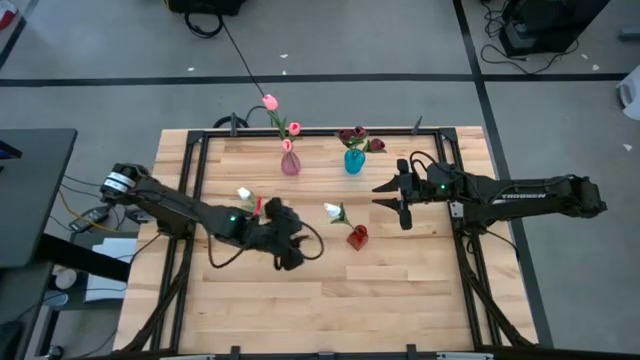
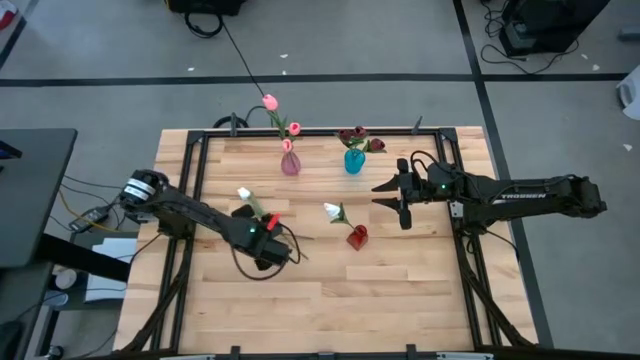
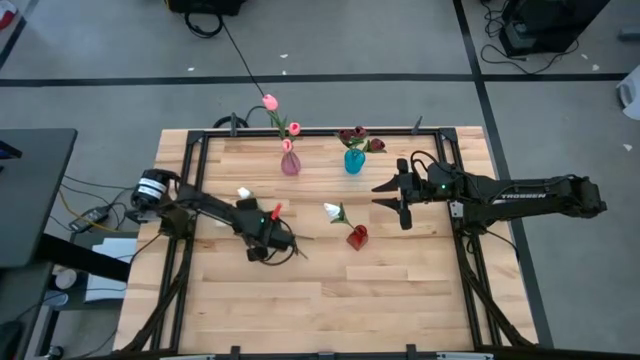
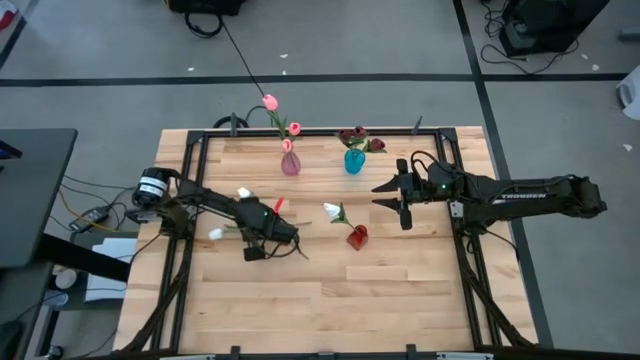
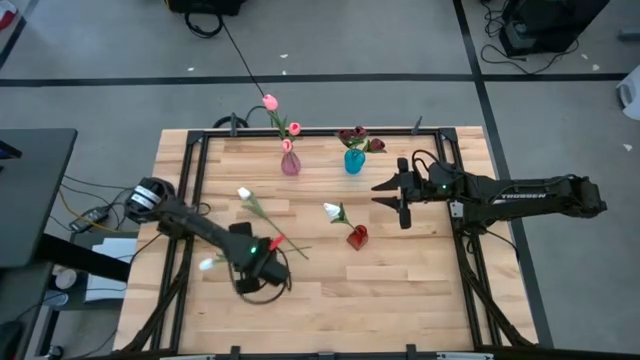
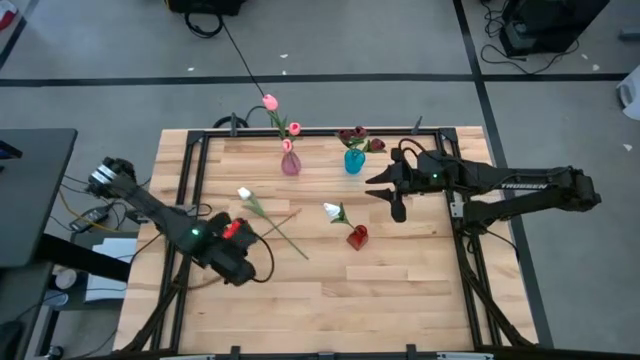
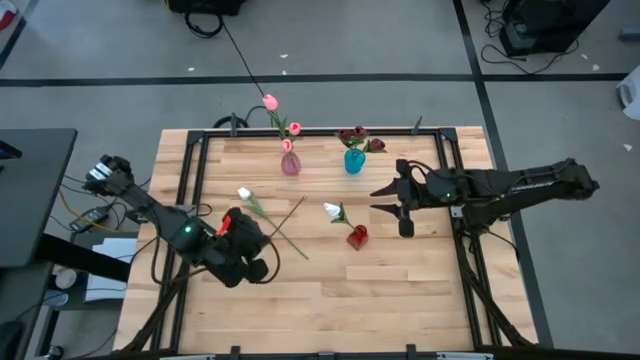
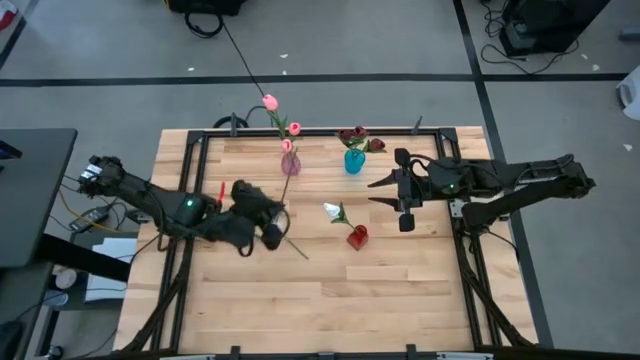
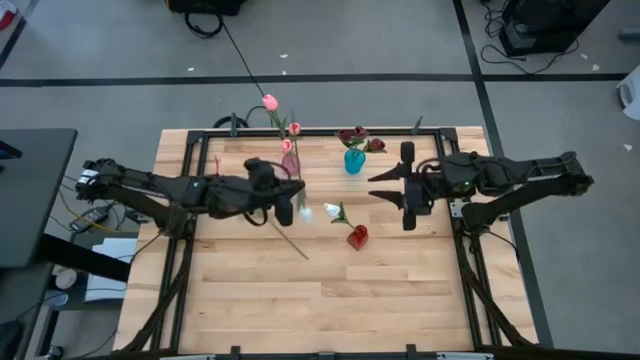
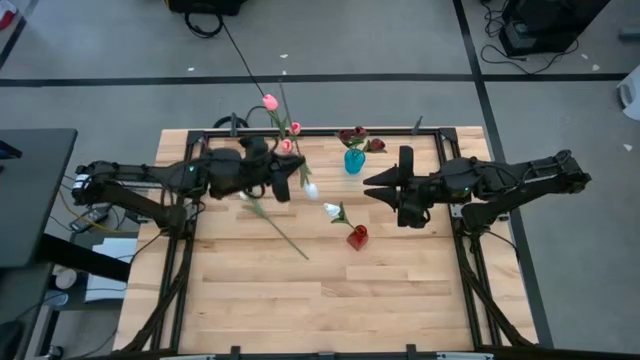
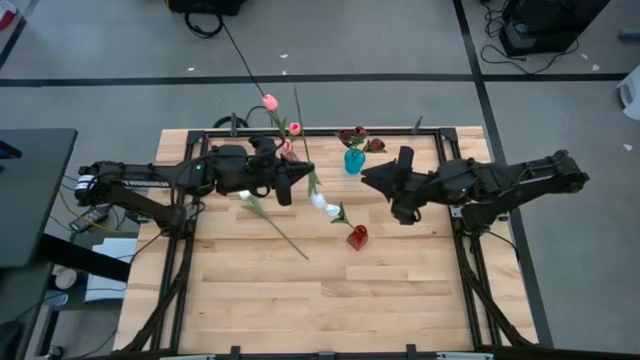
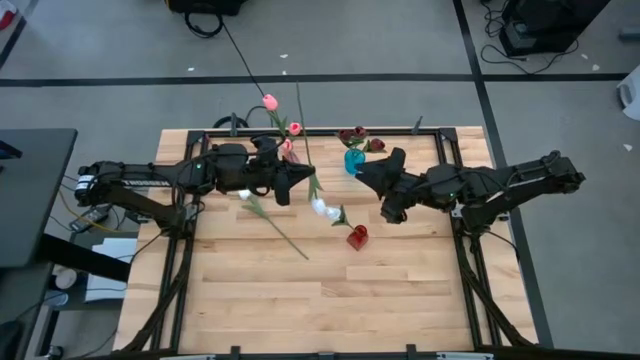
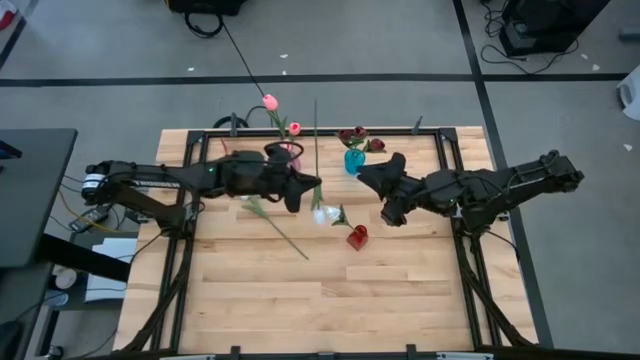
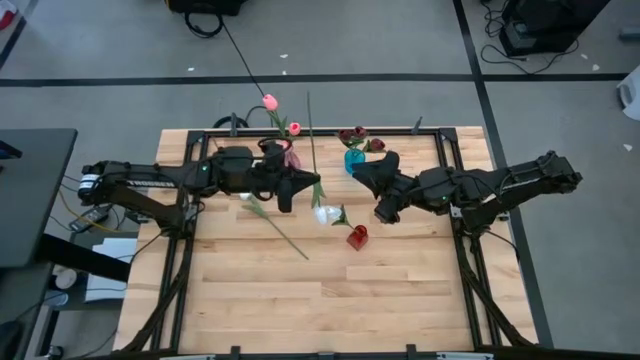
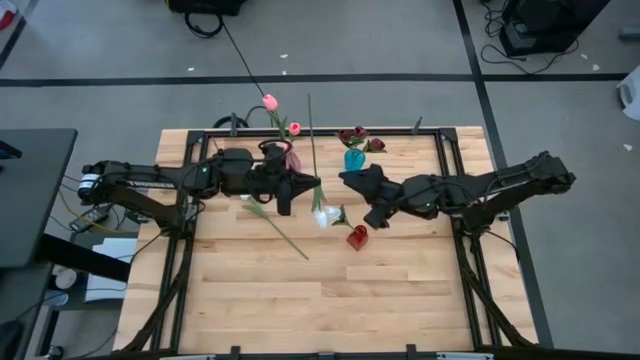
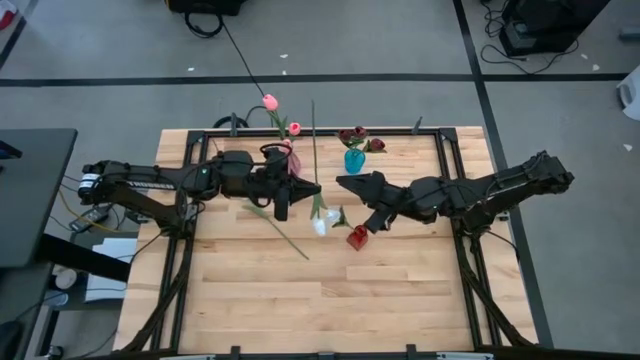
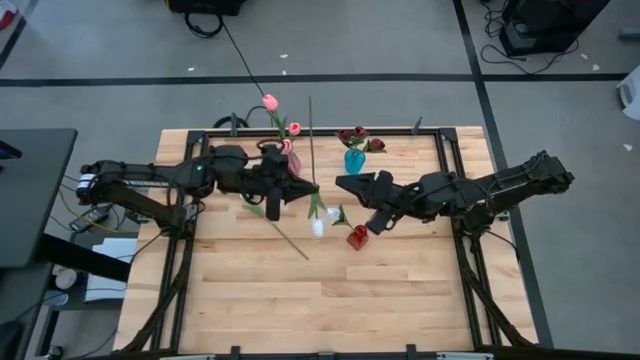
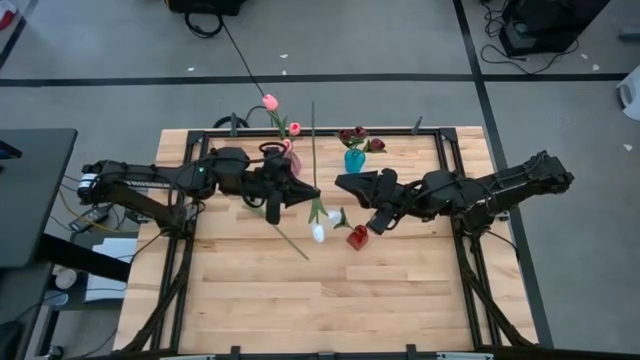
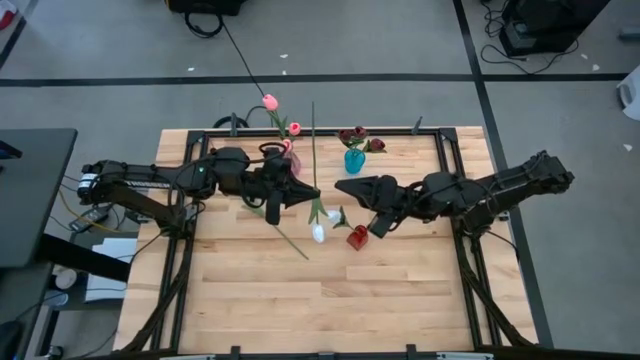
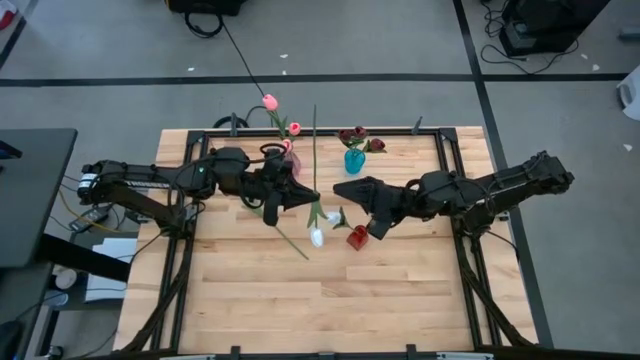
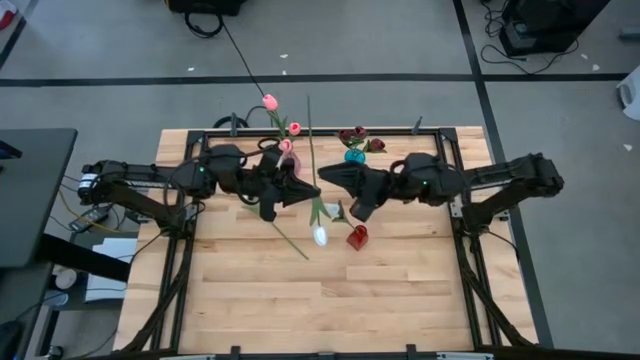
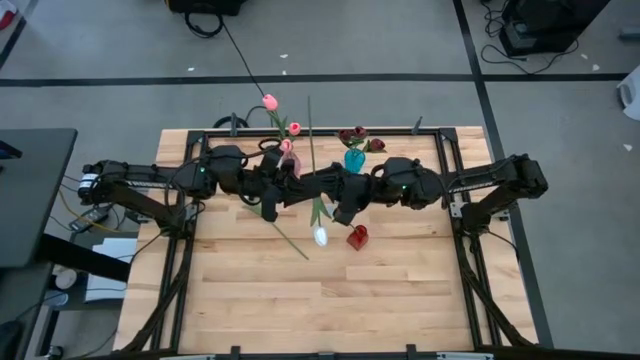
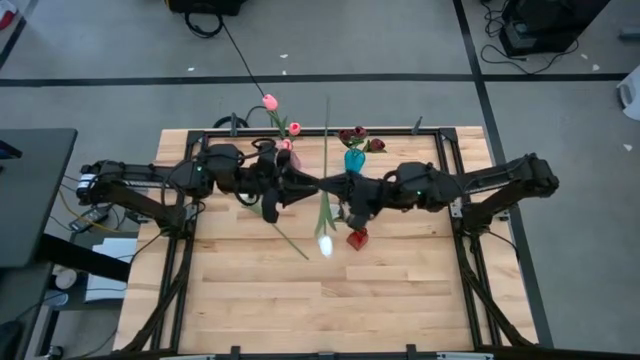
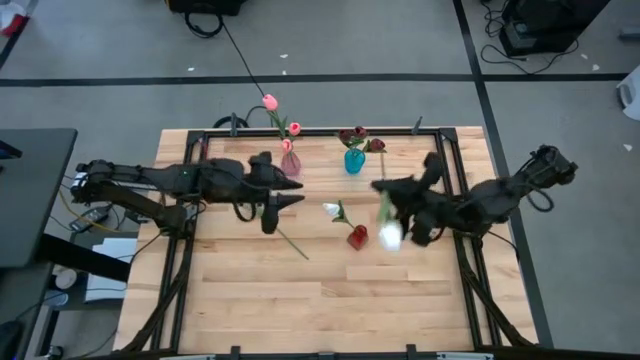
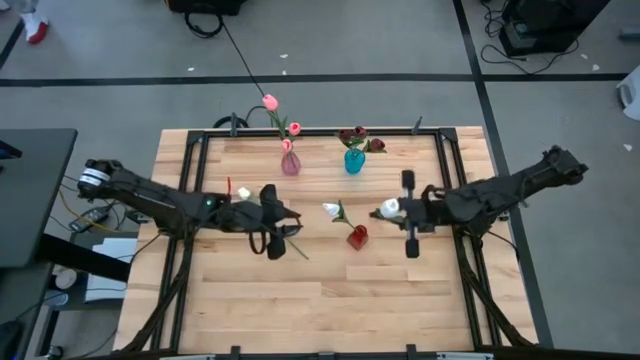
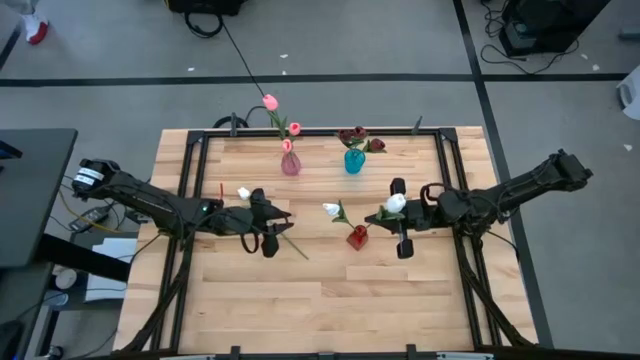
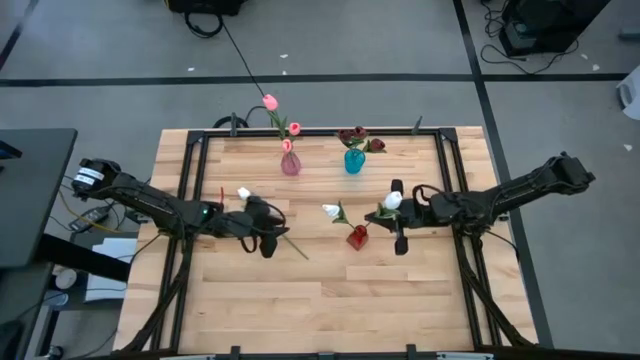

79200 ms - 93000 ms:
Task: Sort flowers into vase by color
Put the bottom white tulip into the red vase

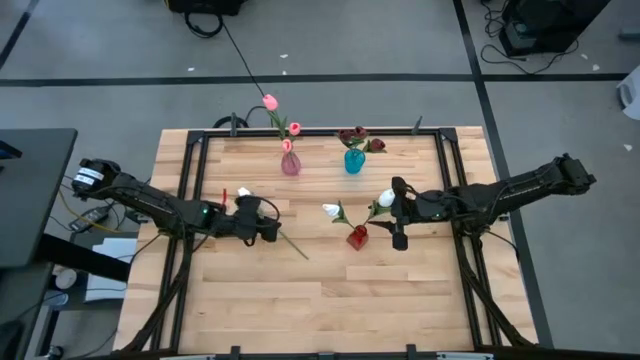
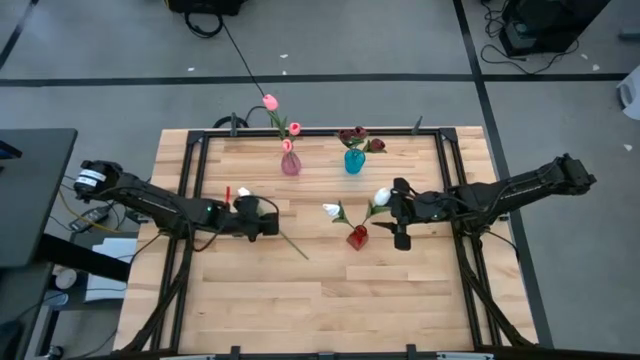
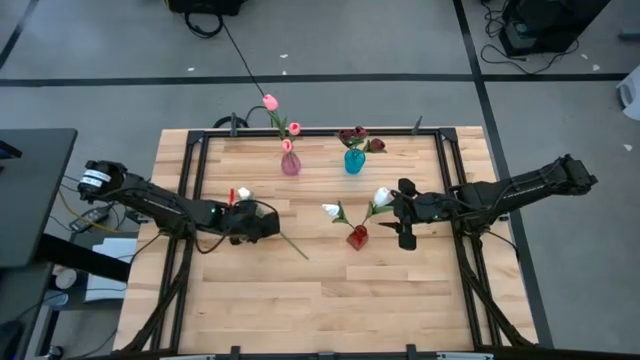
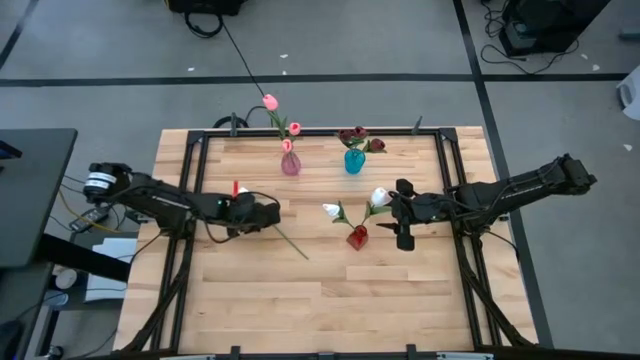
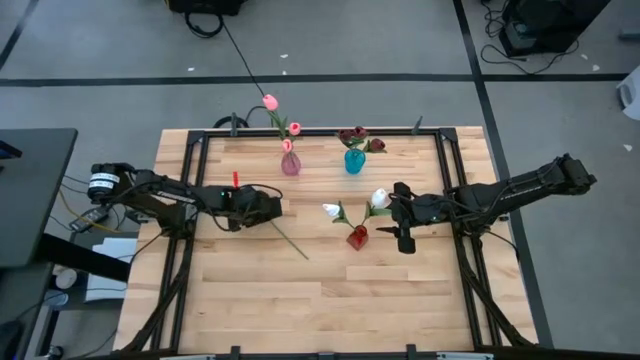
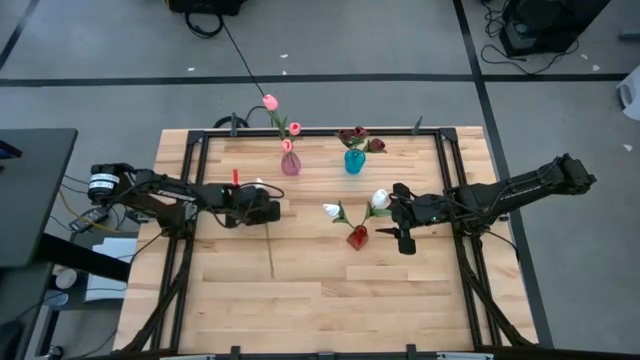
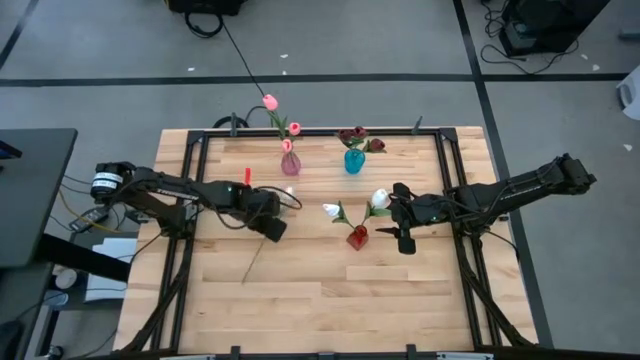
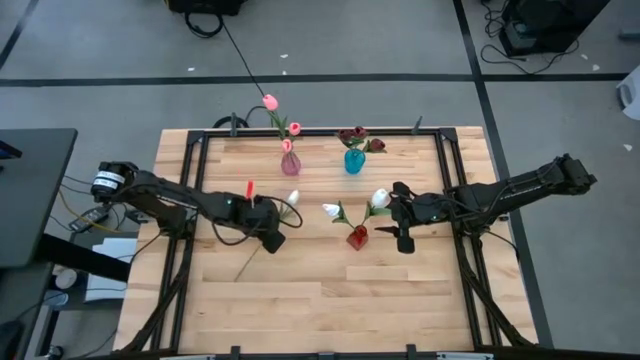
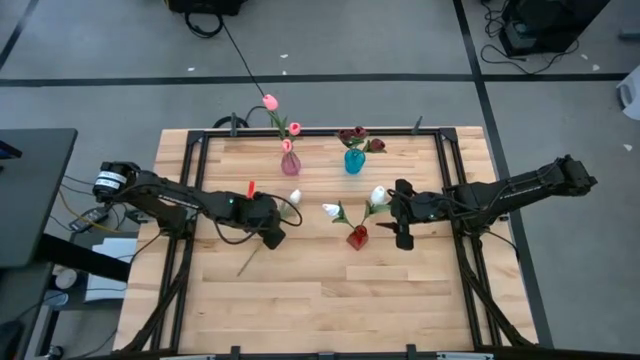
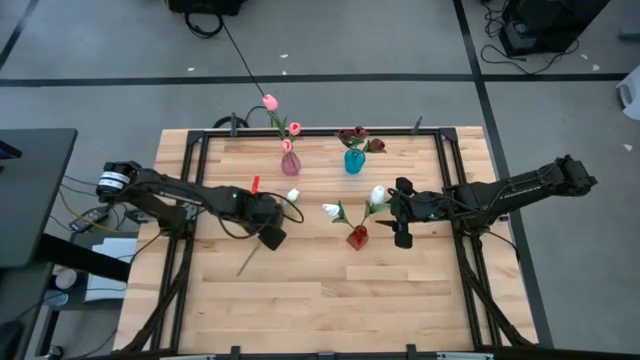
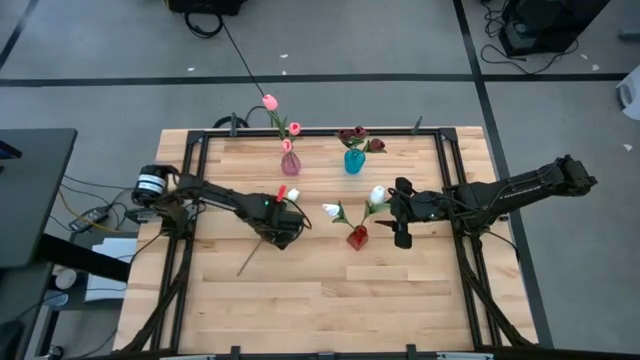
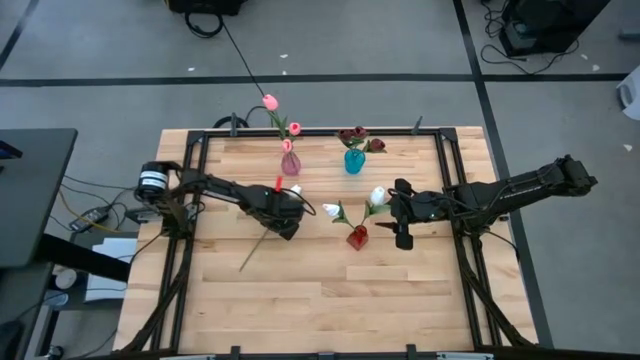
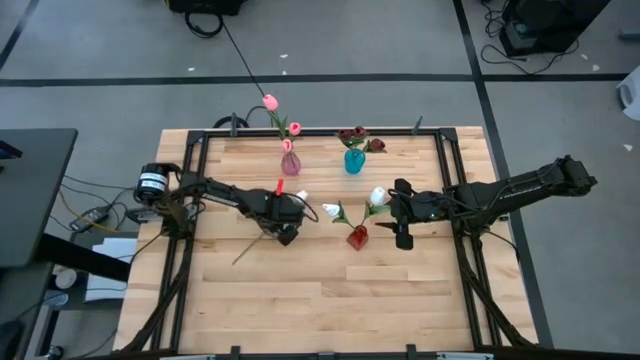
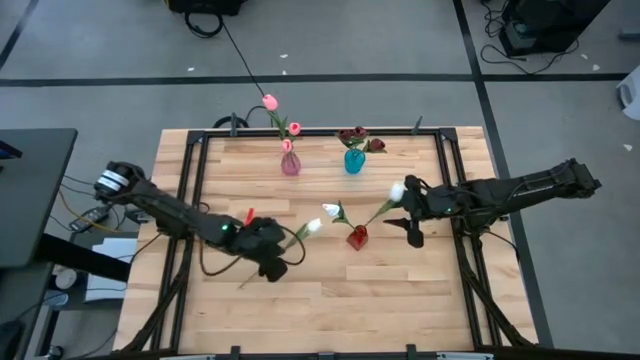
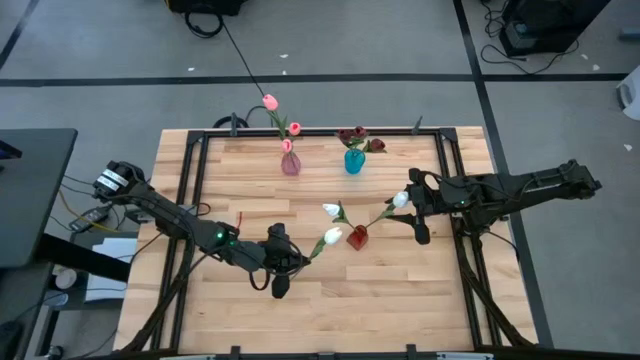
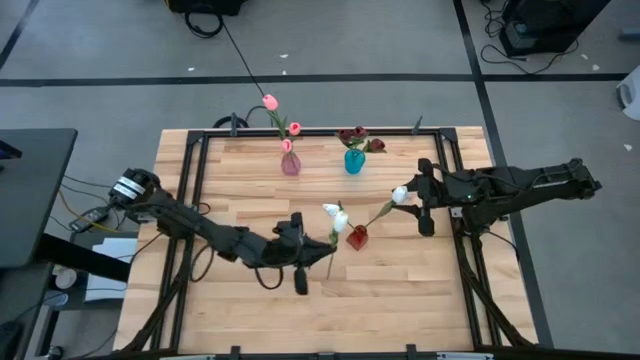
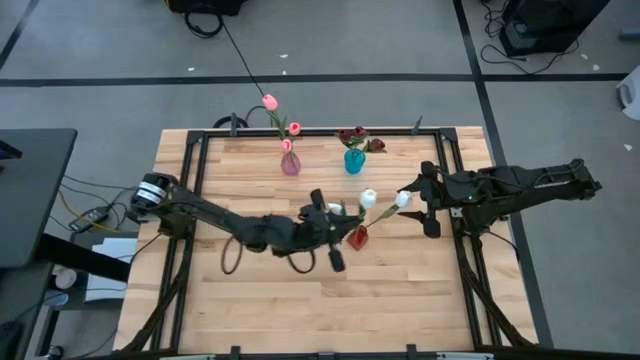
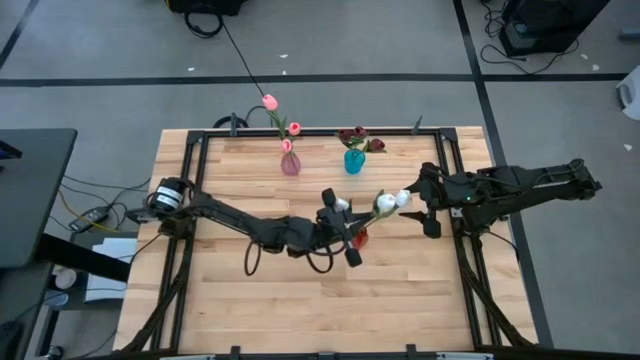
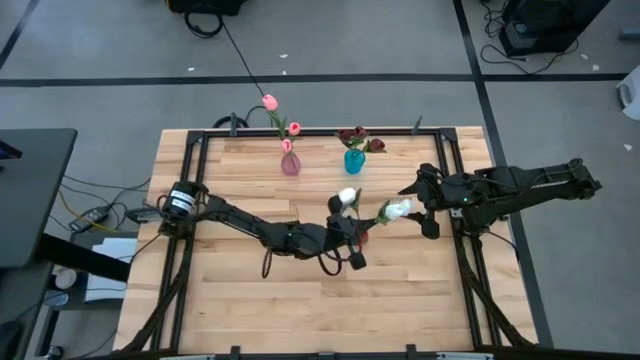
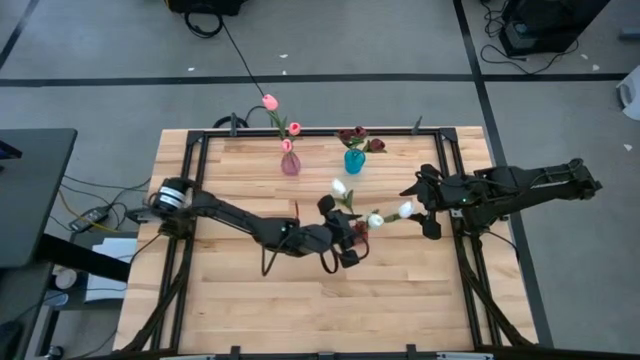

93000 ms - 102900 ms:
Put the white tulip into the red vase
